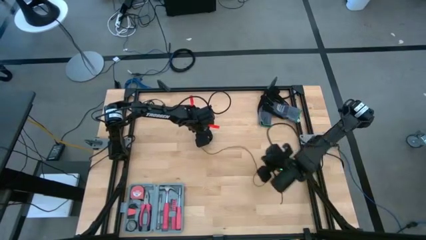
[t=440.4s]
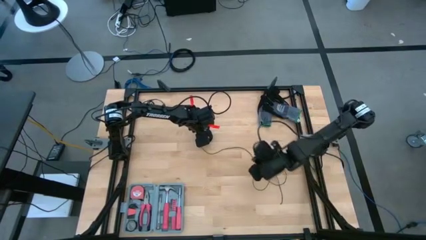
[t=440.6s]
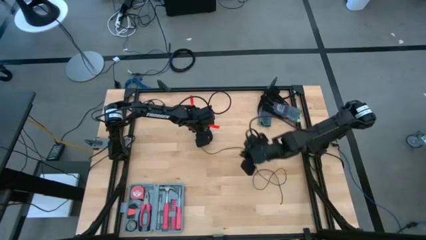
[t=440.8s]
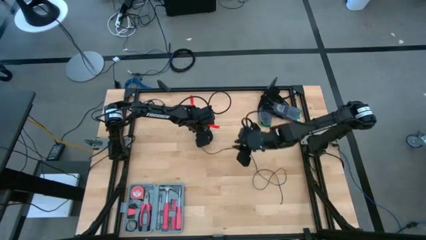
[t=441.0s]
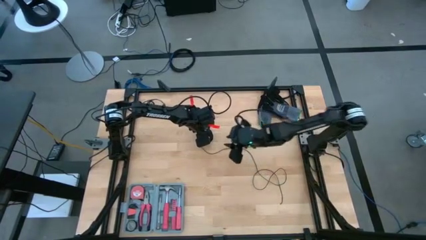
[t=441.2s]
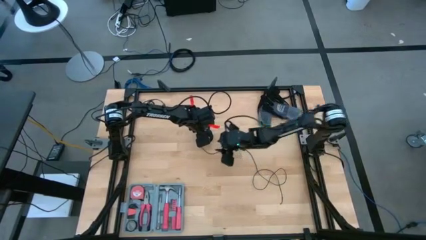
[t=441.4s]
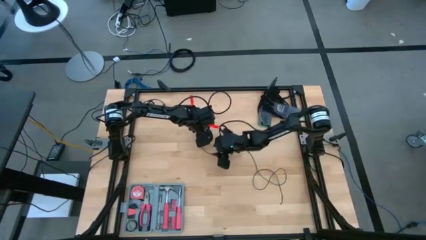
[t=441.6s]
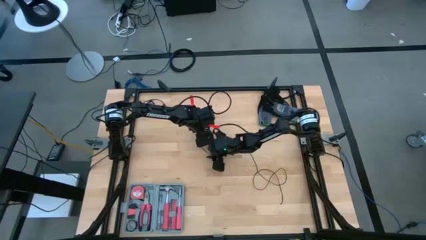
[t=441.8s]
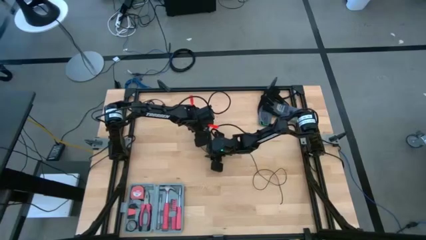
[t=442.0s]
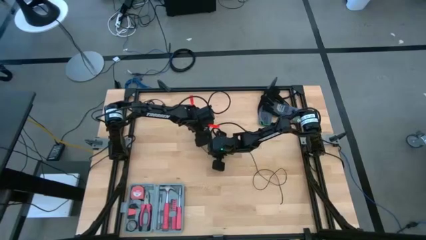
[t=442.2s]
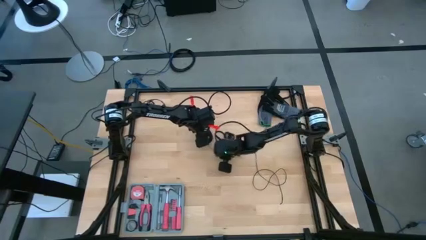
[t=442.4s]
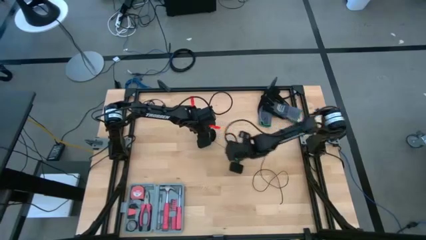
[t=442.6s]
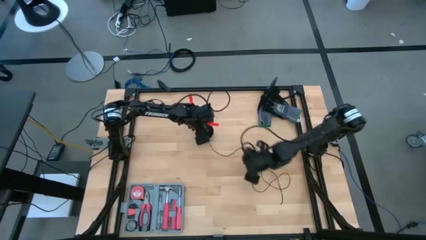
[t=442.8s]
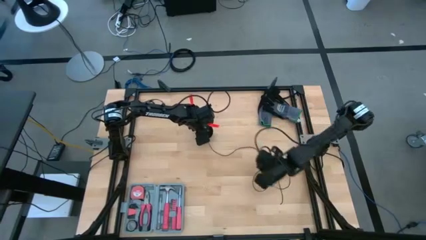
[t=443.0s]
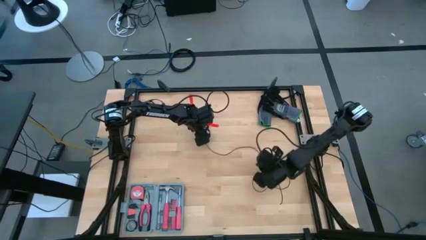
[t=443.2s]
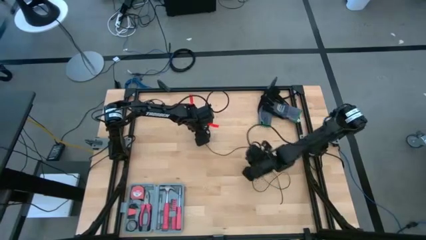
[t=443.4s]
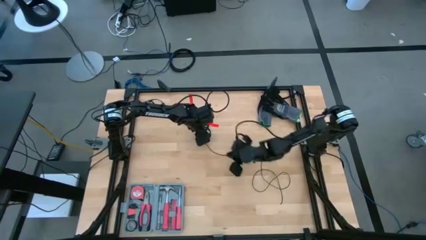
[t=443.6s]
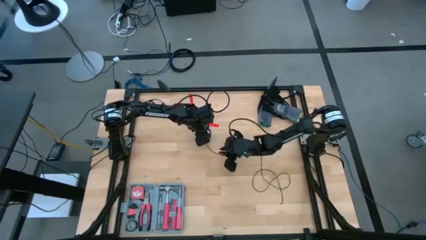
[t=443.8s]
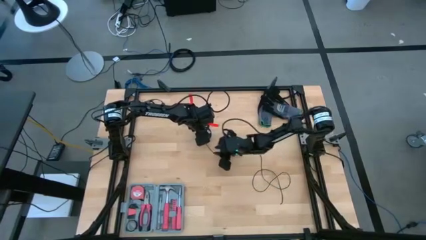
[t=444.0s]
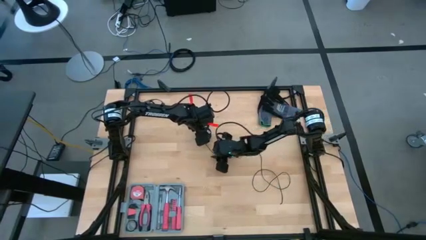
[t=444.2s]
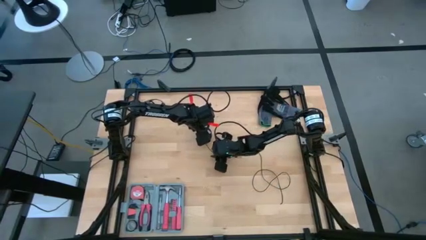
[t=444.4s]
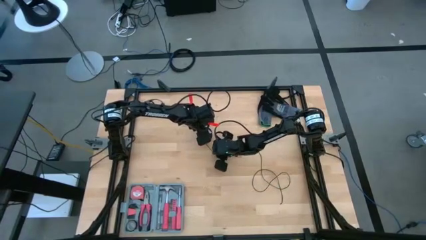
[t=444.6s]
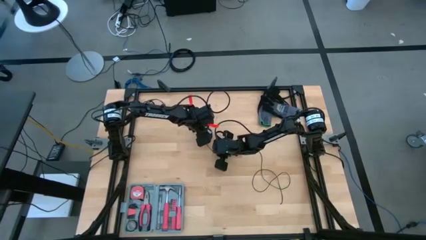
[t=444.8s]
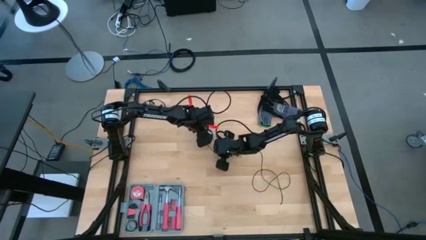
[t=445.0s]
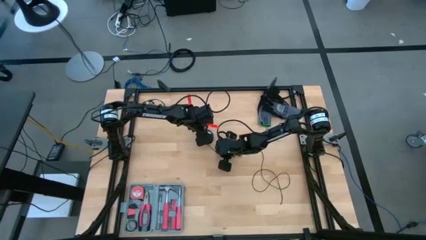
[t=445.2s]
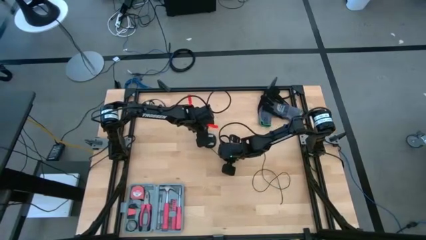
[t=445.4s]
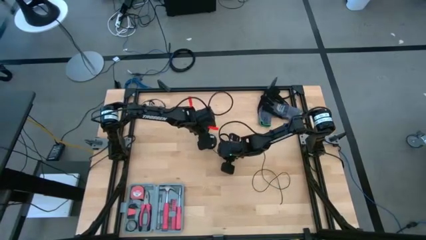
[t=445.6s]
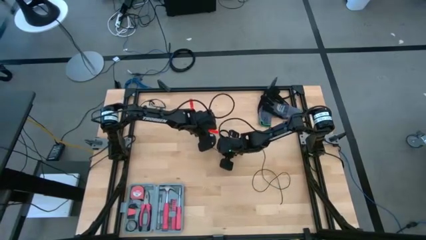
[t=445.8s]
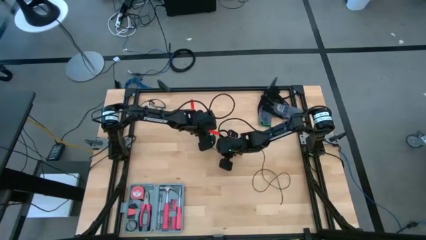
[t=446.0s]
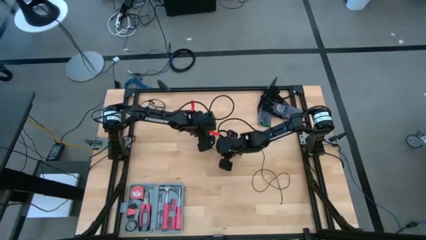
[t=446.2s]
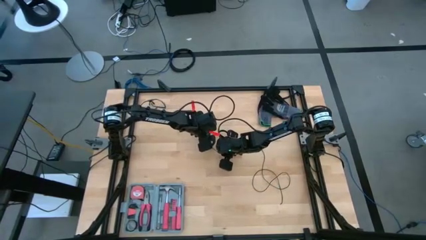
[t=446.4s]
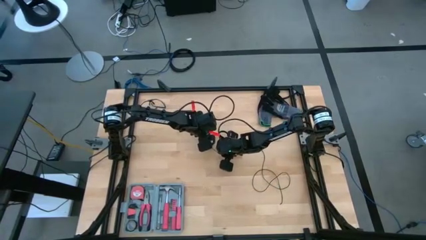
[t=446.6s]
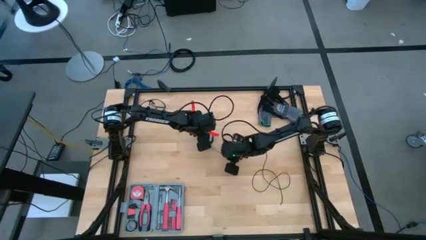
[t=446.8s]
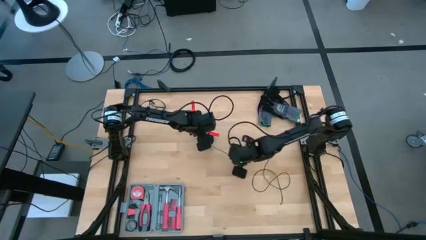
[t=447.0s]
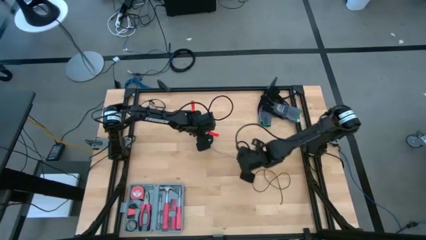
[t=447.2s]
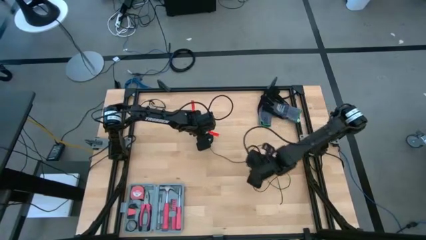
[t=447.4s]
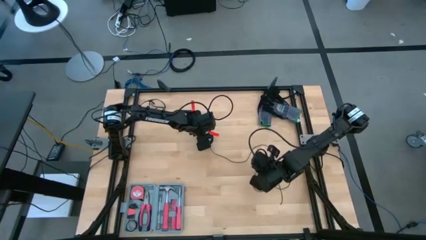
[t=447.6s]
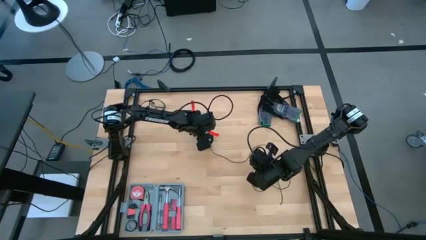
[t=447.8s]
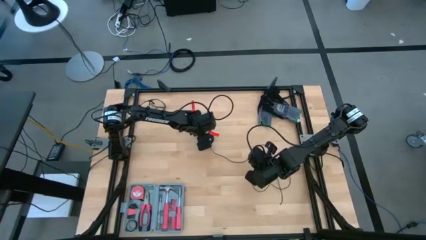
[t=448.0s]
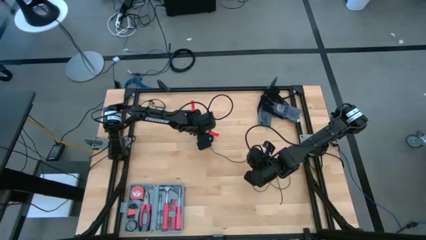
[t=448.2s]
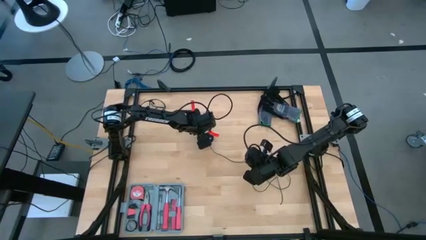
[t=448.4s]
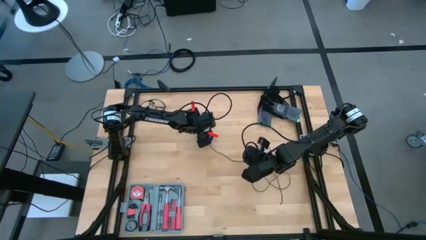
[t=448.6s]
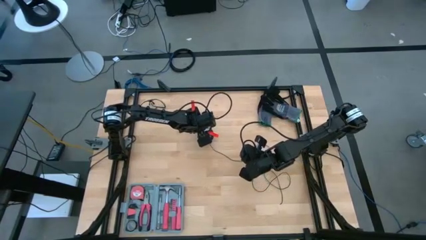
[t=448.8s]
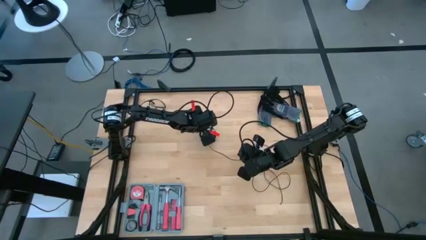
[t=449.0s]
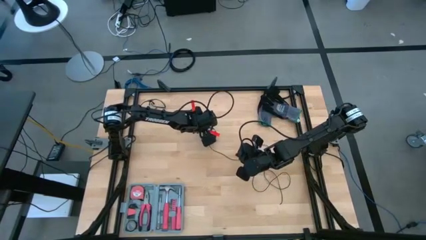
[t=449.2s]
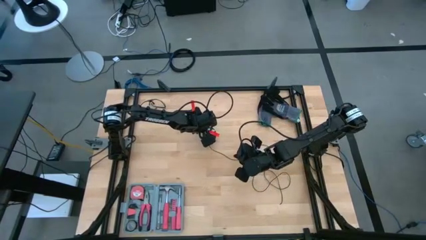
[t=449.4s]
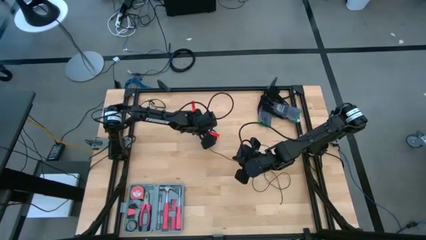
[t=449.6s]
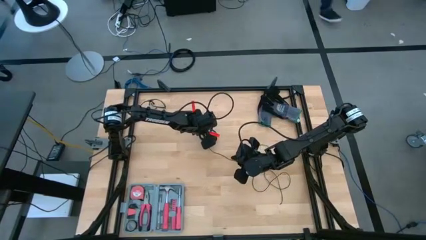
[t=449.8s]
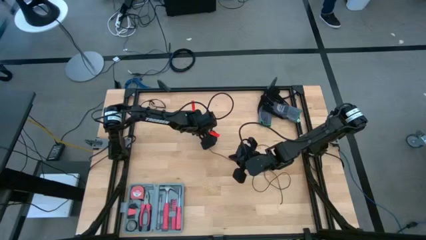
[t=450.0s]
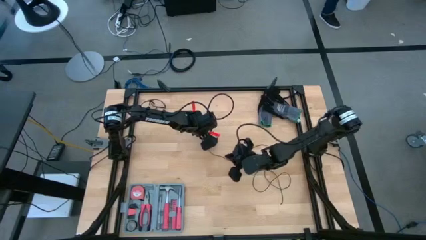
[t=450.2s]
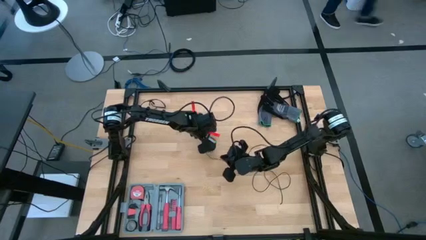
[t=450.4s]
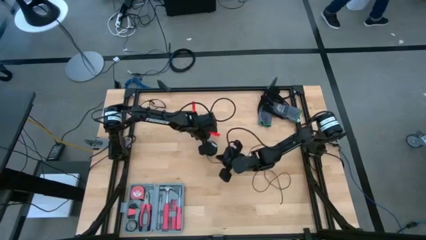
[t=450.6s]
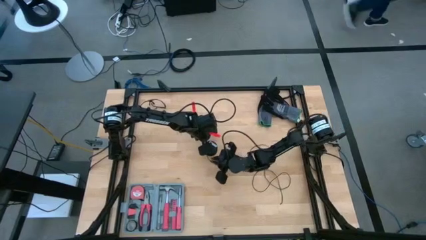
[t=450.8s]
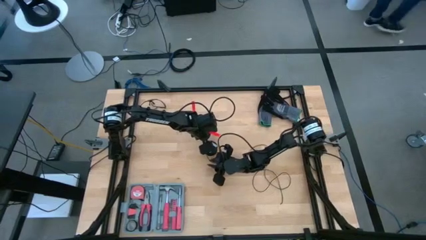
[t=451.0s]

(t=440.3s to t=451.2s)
Task: Coil cords
Uncoil the black wire from the black spool
